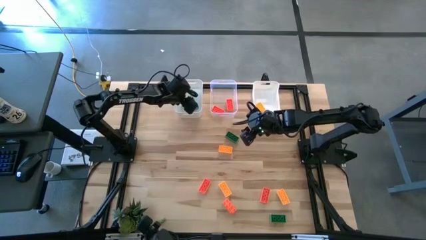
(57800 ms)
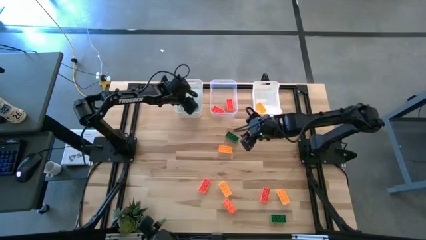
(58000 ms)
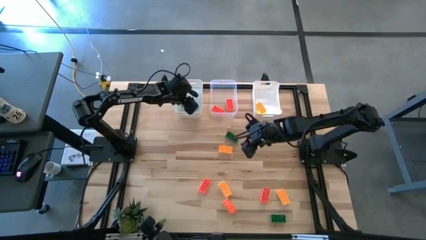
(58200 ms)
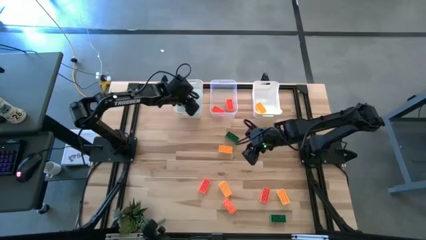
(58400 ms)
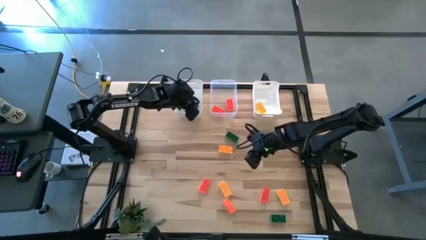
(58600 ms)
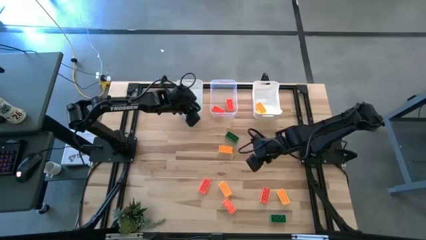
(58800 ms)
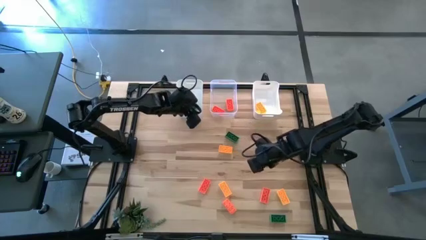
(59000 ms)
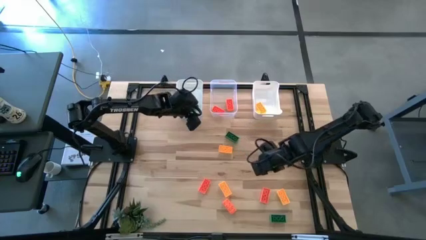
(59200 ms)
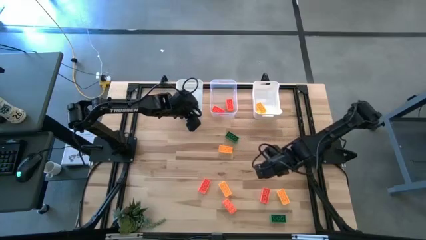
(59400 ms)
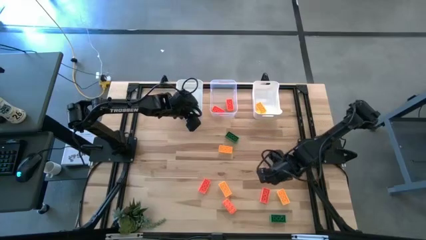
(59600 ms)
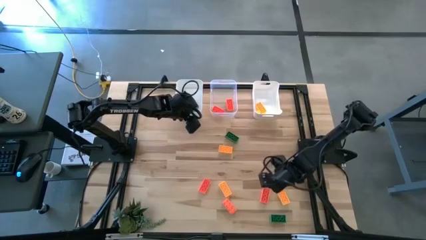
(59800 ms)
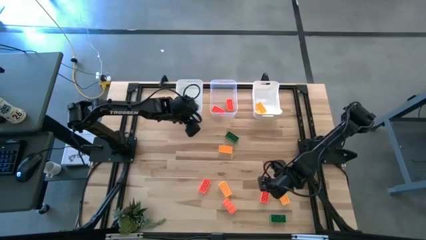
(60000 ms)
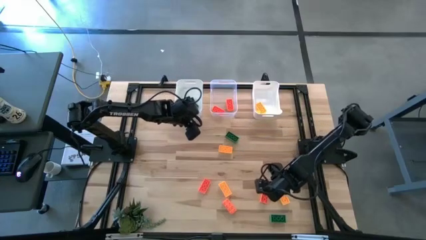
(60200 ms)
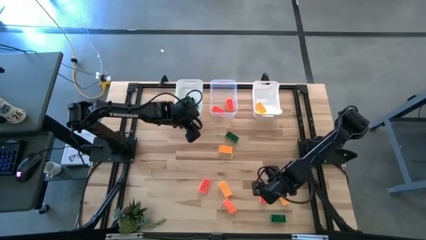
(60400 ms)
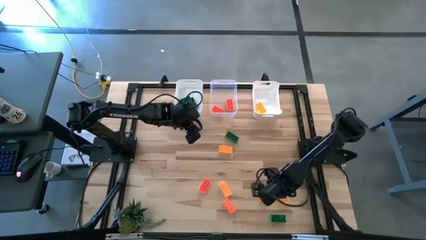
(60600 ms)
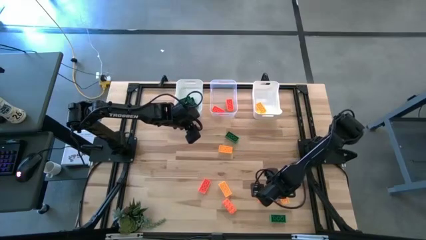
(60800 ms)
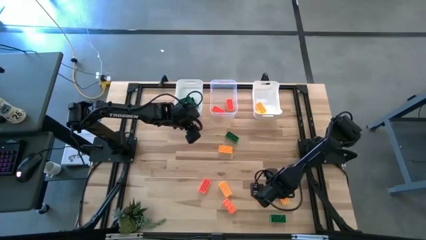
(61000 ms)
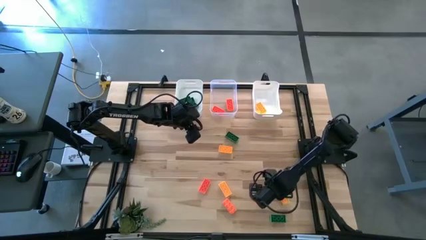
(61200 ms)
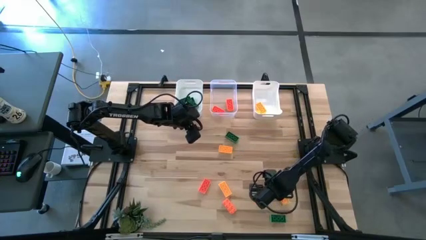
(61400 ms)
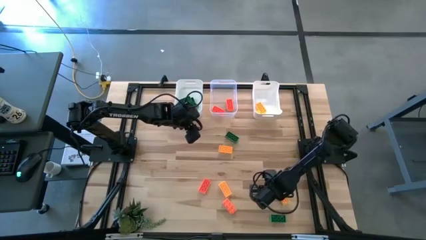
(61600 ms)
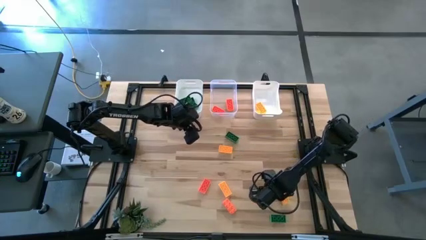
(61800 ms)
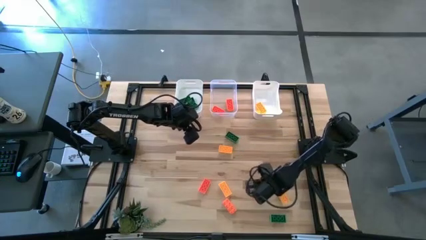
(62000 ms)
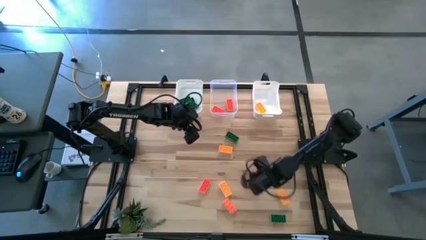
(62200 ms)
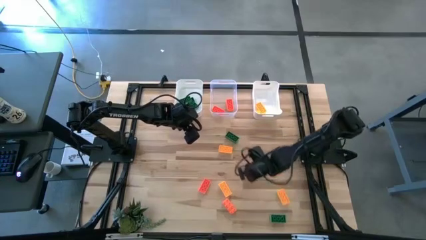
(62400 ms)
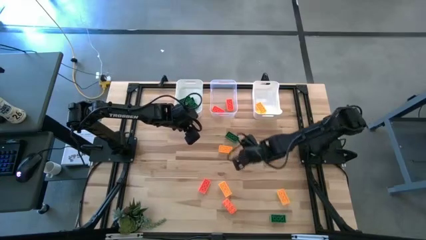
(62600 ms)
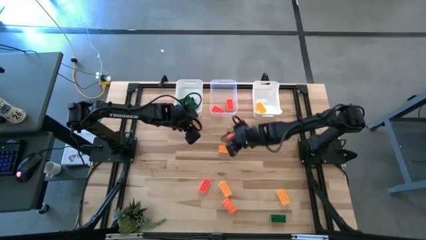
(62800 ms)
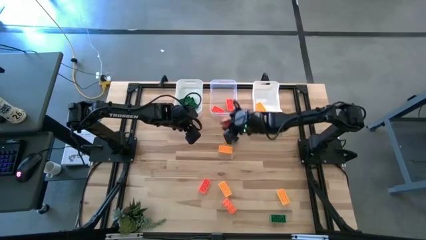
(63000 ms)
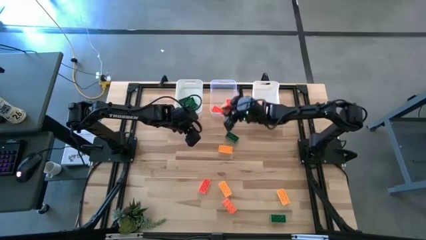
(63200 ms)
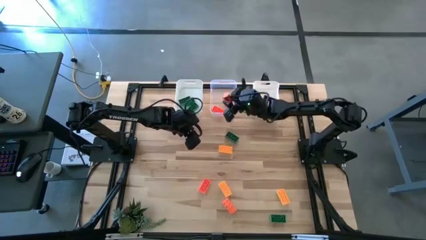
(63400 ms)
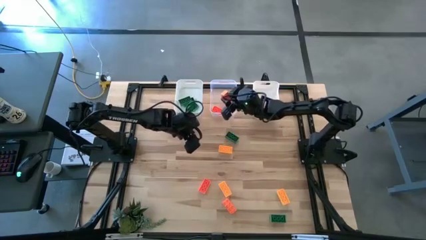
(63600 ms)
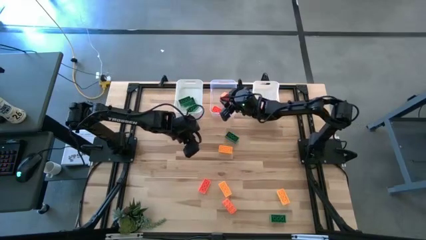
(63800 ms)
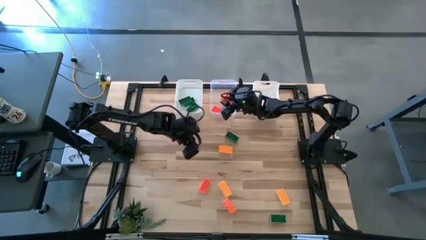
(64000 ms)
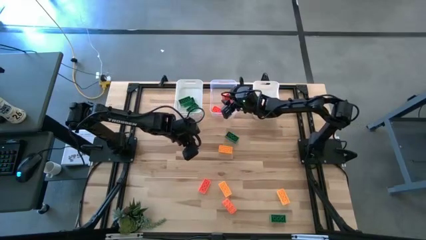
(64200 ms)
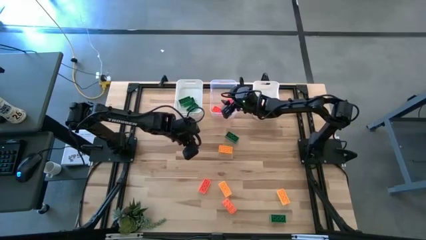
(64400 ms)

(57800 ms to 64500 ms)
Task: Sort & place blocks by color
Put the orange game piece into the transparent bin

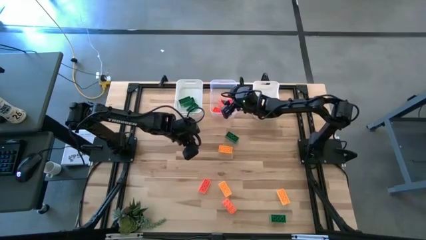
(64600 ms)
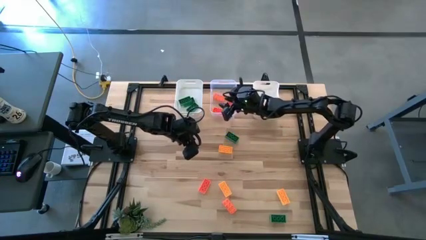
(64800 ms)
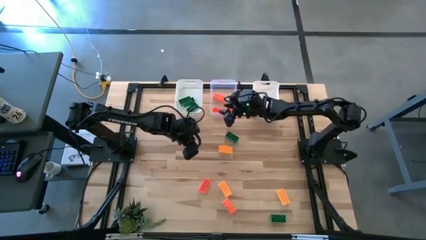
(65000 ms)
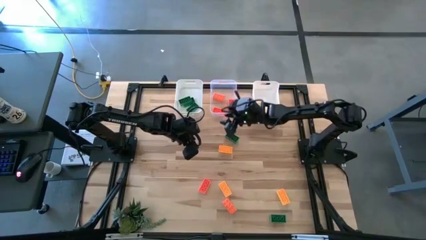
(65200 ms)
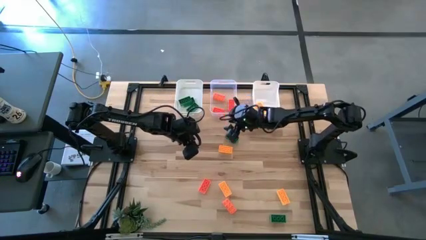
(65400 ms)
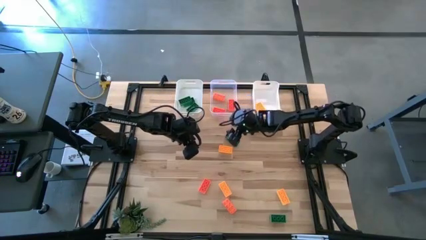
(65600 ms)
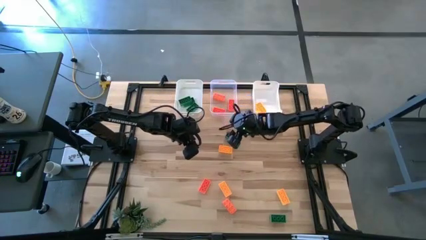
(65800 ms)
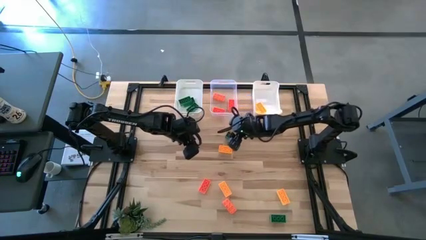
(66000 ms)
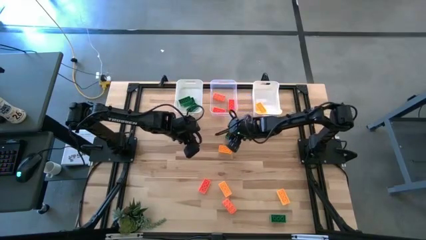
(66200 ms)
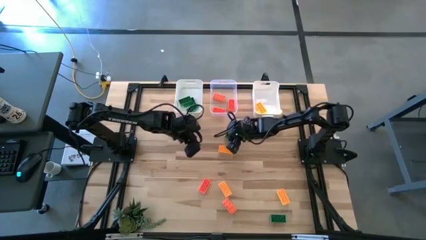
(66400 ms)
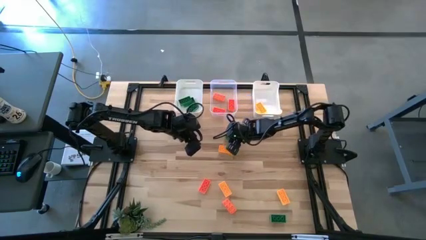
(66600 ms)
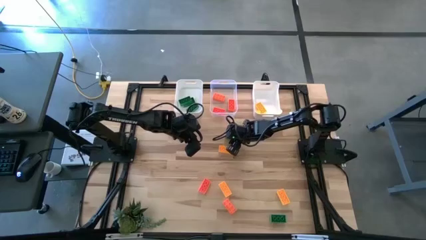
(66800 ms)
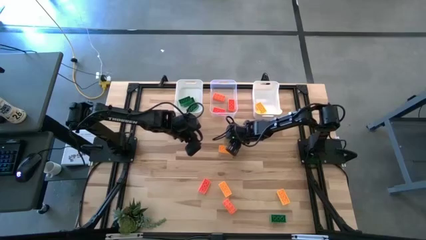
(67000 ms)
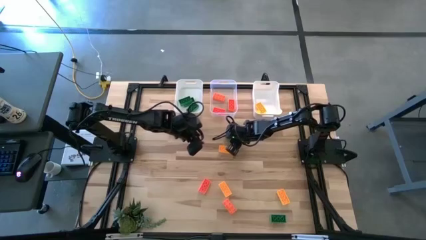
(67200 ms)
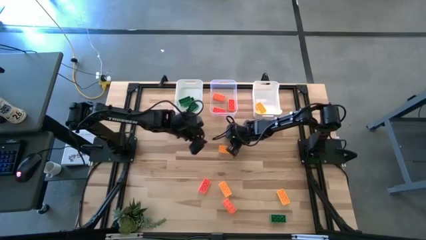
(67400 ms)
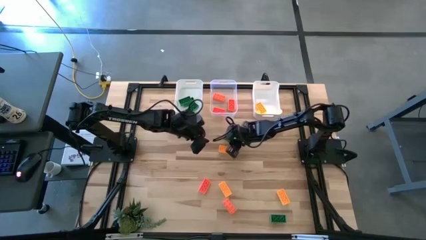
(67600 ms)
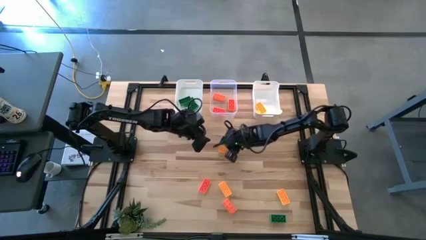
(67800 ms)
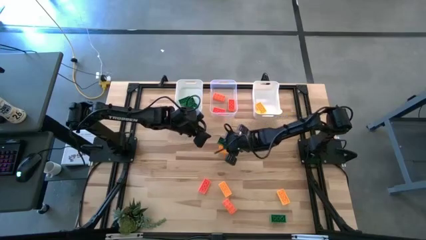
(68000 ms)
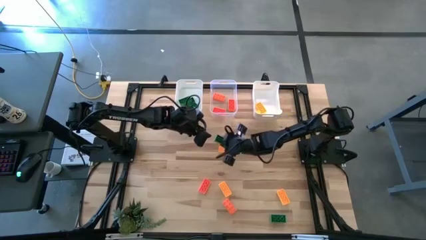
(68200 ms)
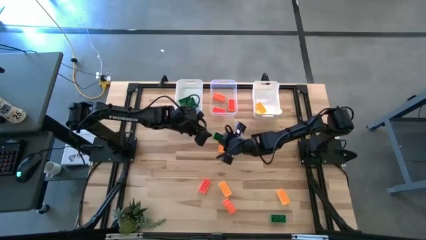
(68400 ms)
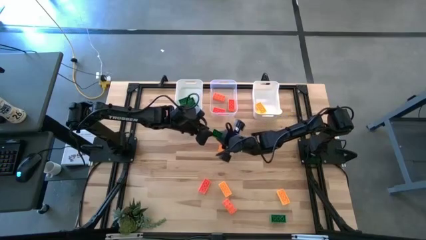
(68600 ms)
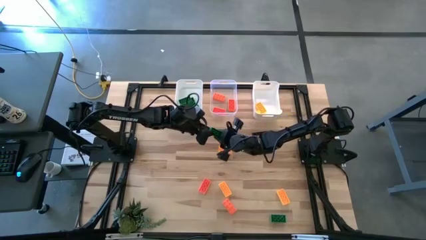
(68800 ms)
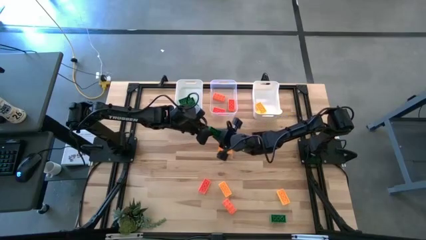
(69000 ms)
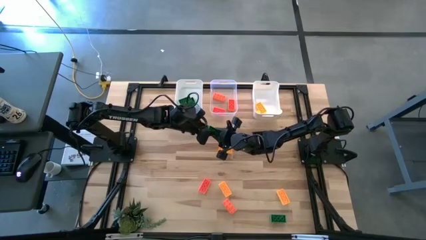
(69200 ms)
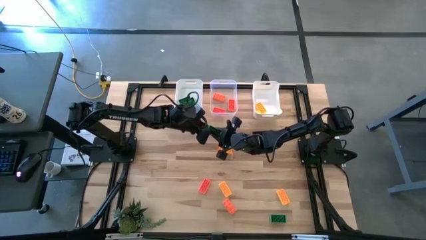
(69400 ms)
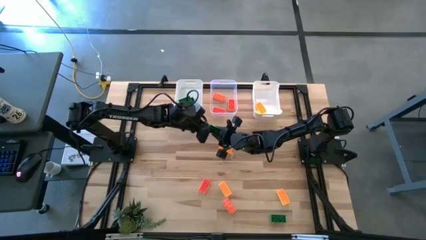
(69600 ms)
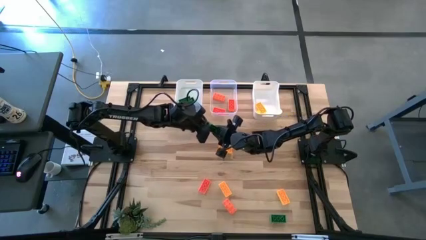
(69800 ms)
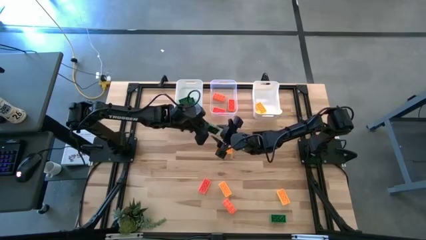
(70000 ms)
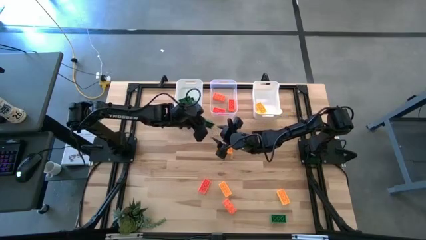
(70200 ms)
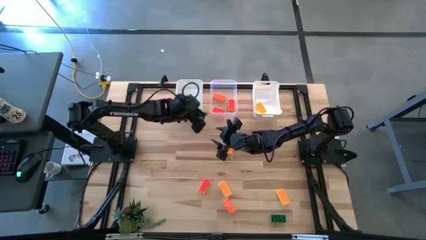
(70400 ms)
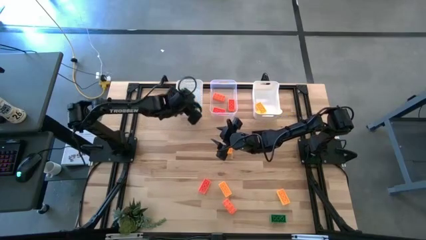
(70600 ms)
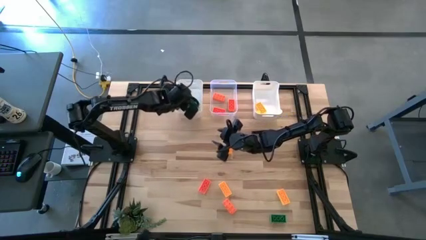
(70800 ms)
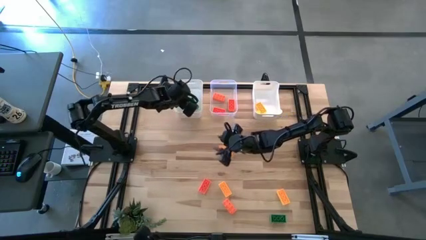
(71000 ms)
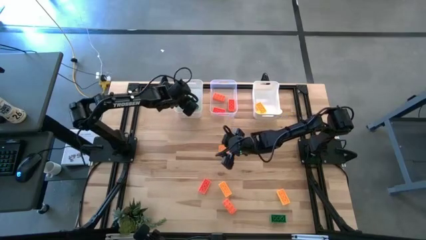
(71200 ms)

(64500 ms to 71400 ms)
Put the green game piece into the left white bin

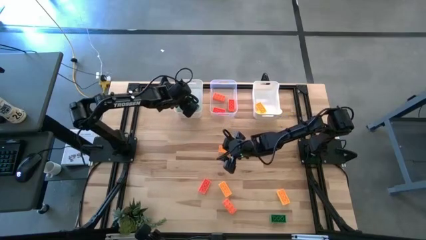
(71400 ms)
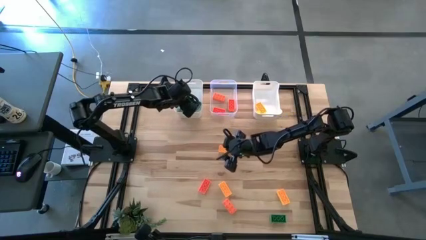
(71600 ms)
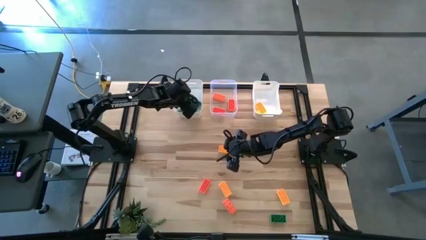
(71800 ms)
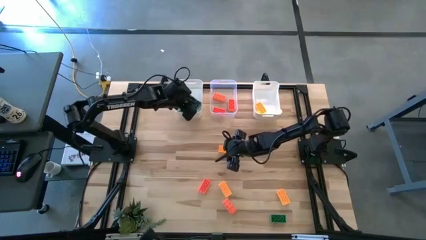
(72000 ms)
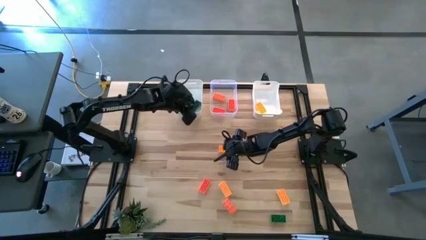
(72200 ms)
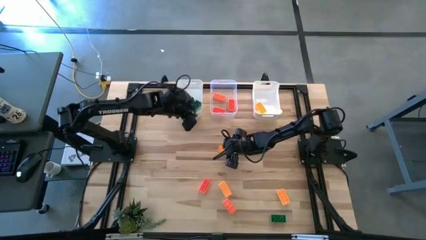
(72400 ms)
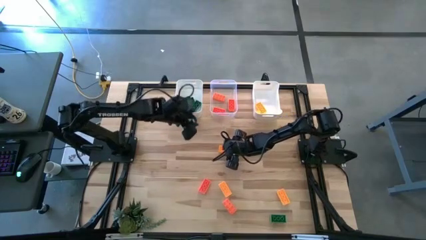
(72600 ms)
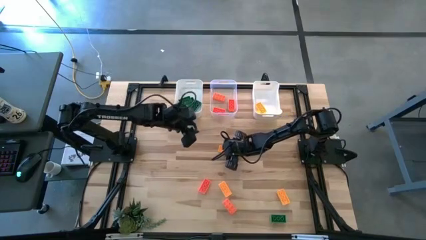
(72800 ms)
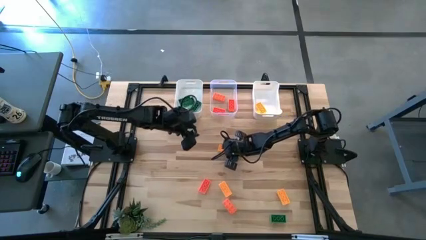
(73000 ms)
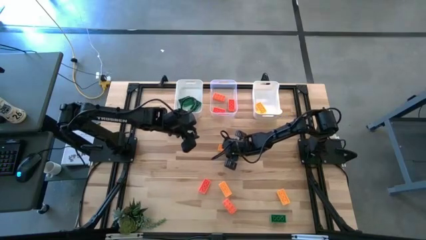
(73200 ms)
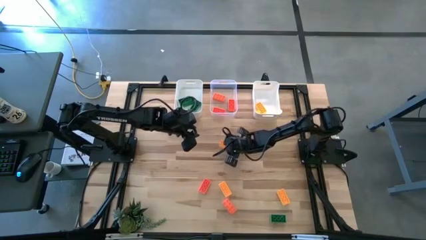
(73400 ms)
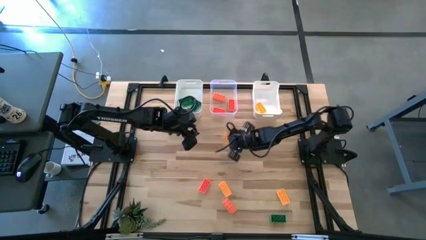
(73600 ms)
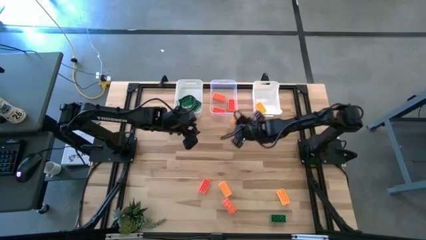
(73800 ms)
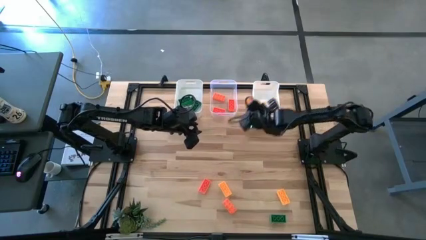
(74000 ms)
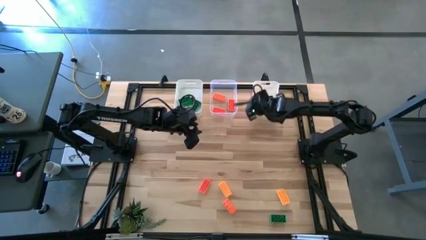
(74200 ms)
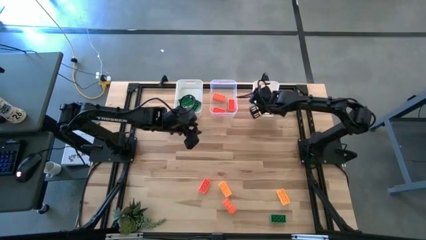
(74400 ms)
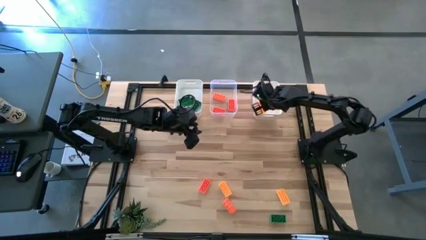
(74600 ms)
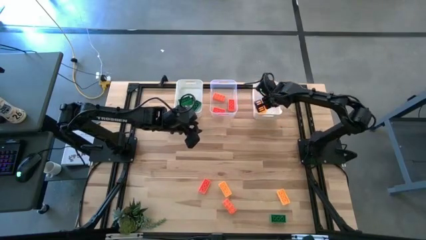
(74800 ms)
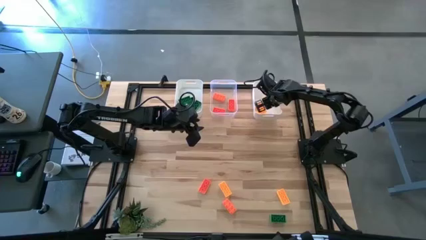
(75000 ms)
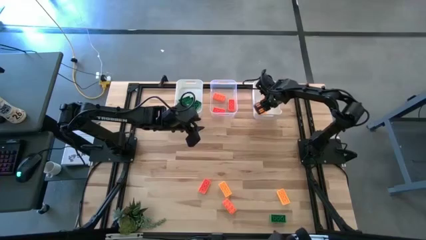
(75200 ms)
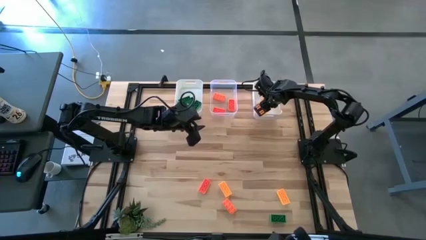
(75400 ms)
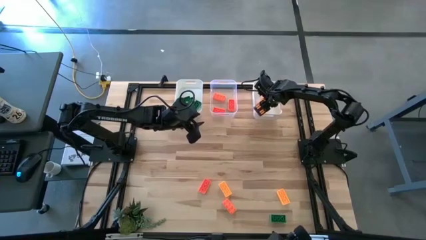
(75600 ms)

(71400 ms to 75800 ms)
Put the yellow game piece into the right white bin
